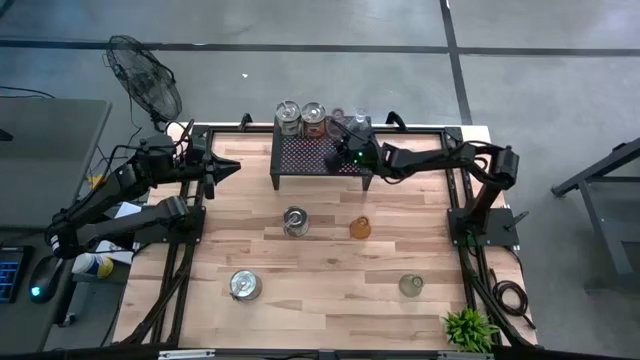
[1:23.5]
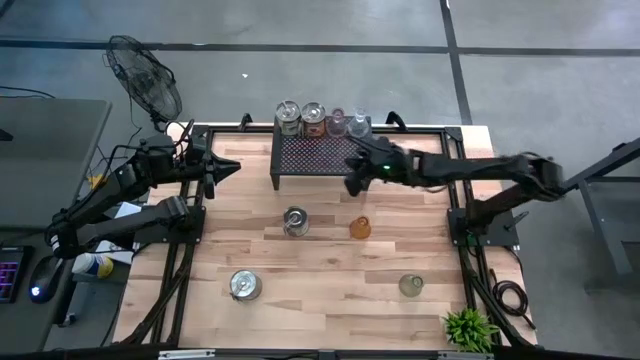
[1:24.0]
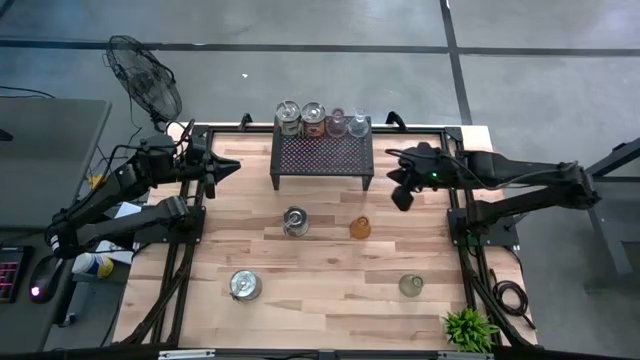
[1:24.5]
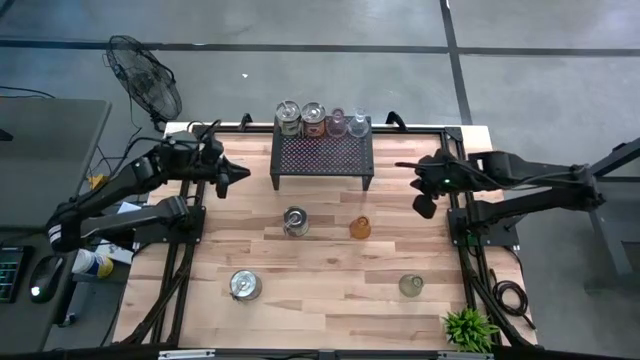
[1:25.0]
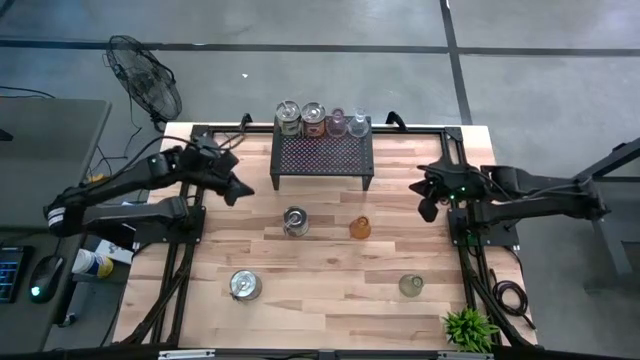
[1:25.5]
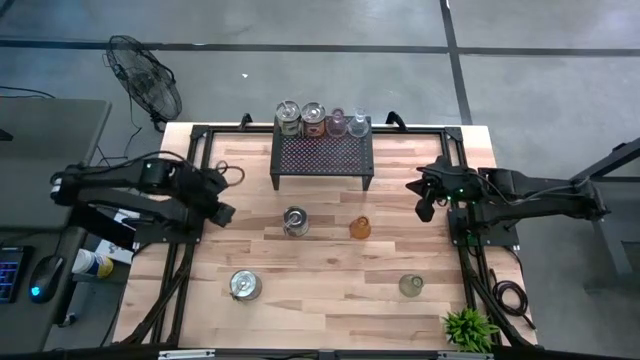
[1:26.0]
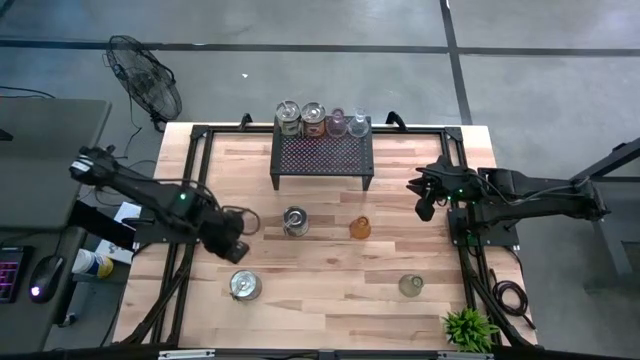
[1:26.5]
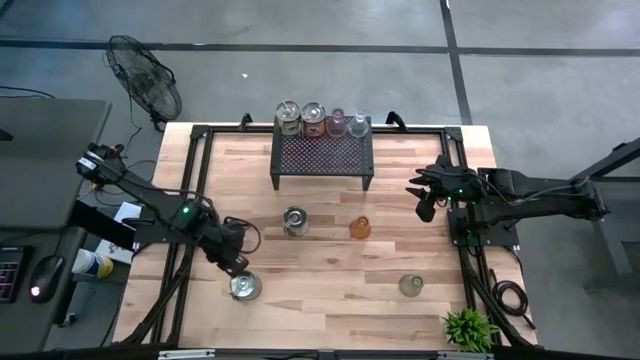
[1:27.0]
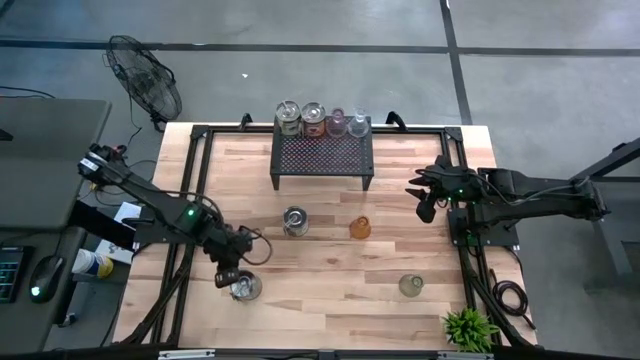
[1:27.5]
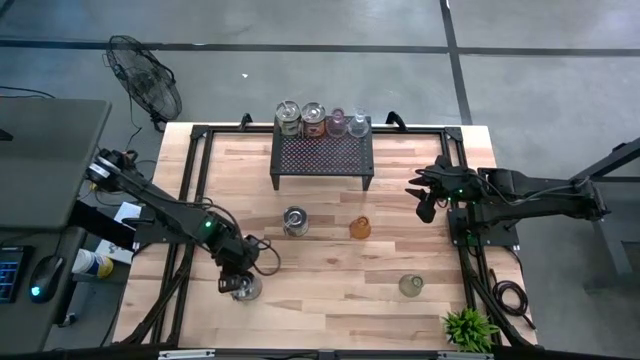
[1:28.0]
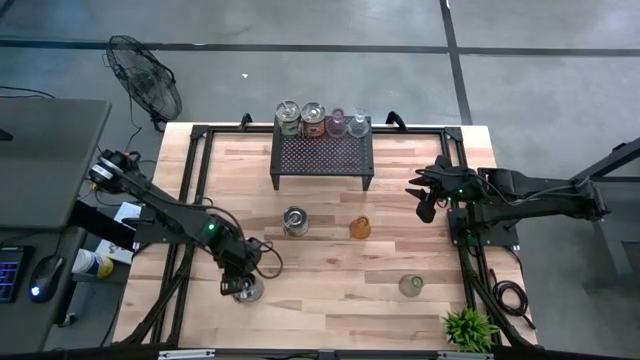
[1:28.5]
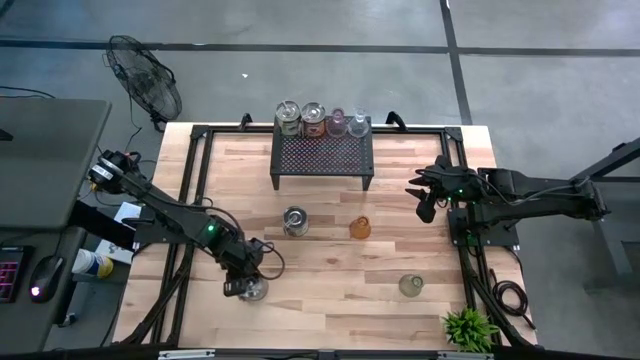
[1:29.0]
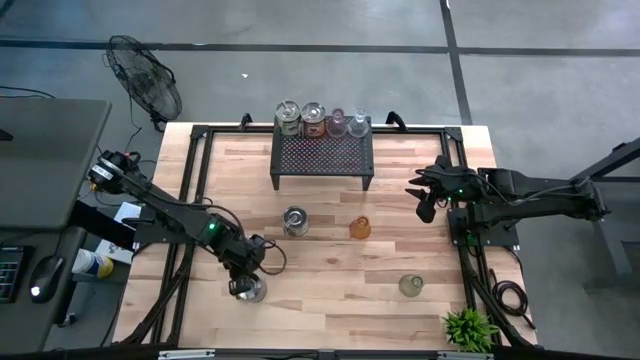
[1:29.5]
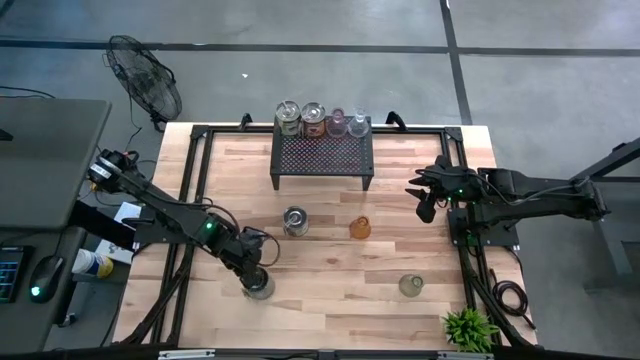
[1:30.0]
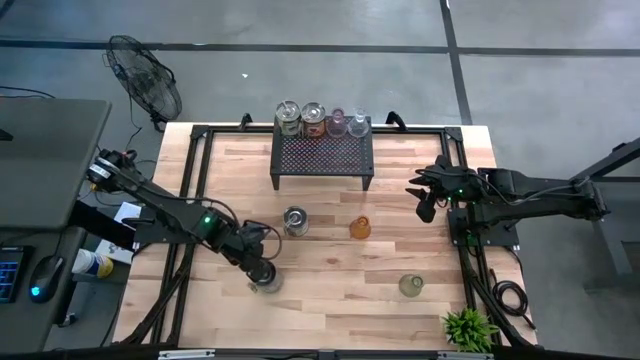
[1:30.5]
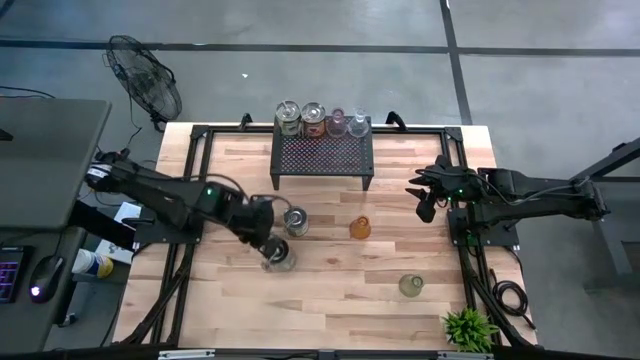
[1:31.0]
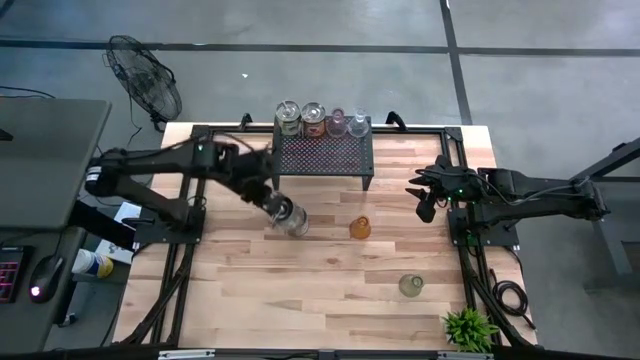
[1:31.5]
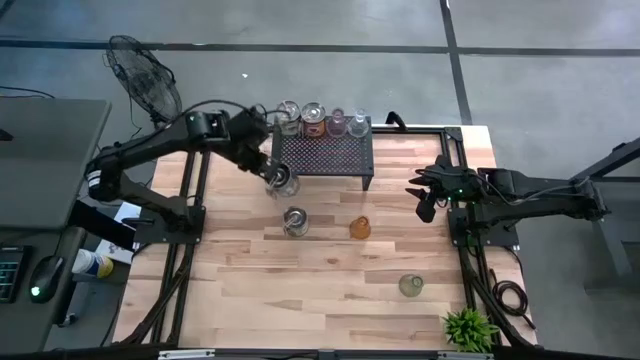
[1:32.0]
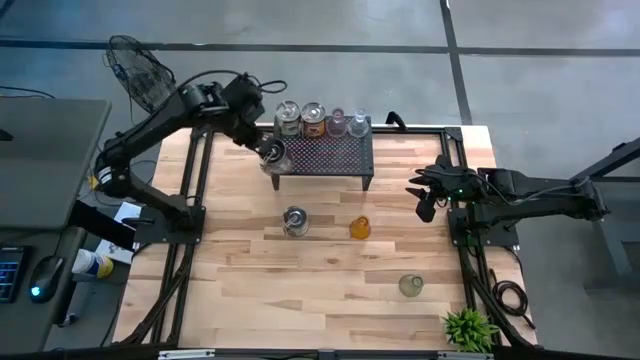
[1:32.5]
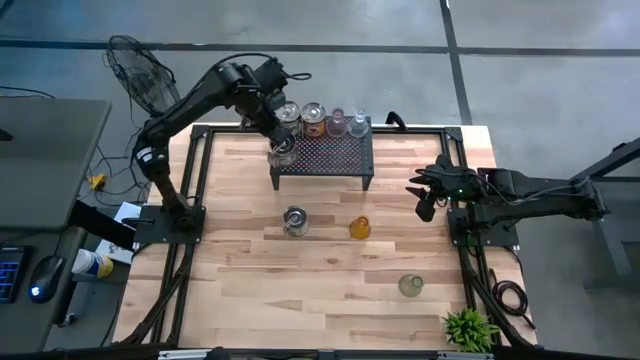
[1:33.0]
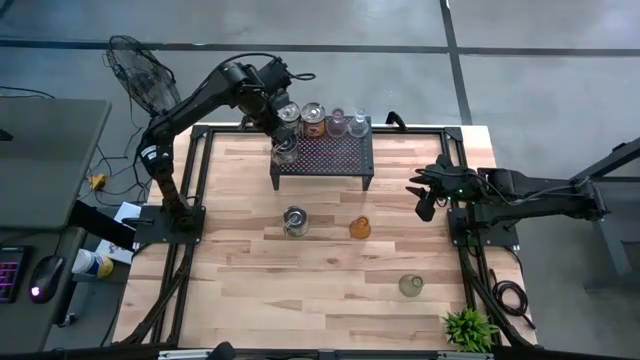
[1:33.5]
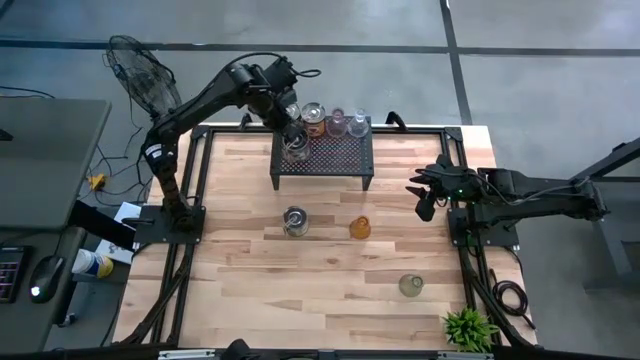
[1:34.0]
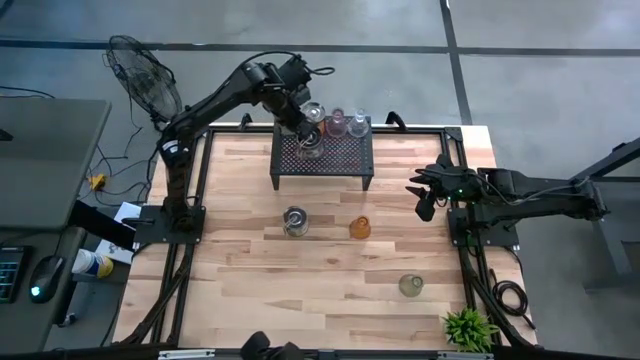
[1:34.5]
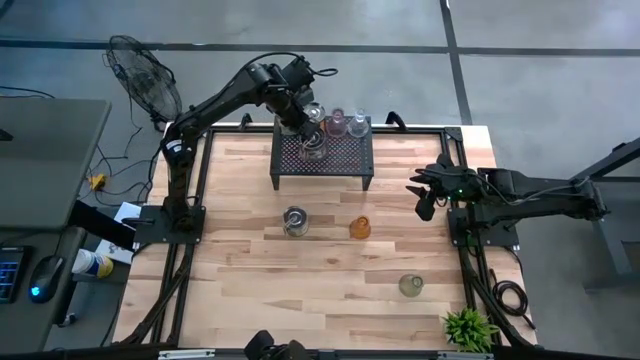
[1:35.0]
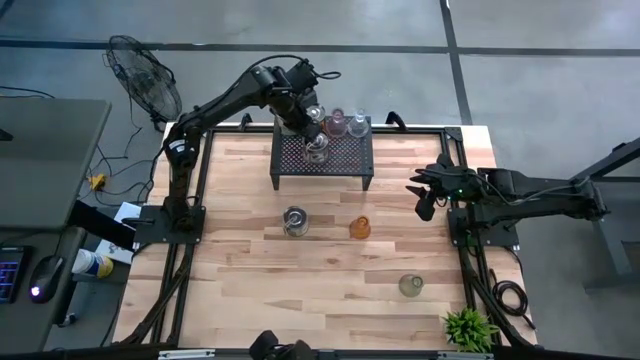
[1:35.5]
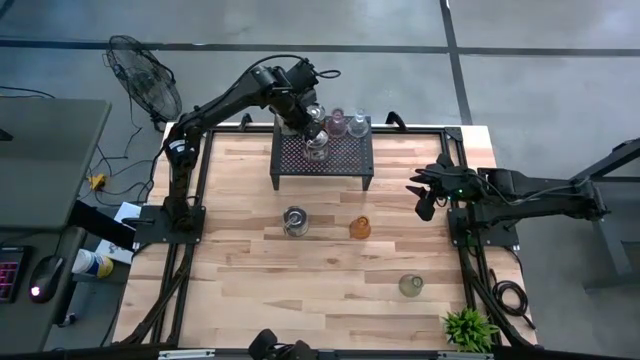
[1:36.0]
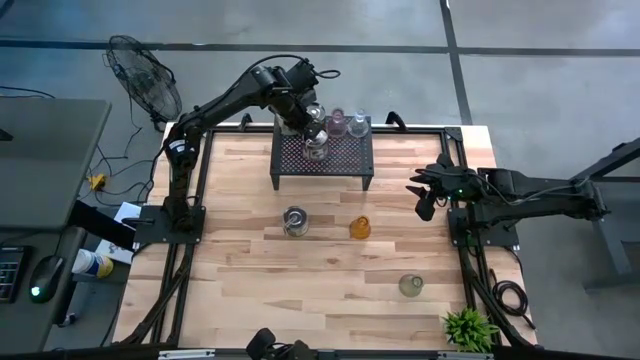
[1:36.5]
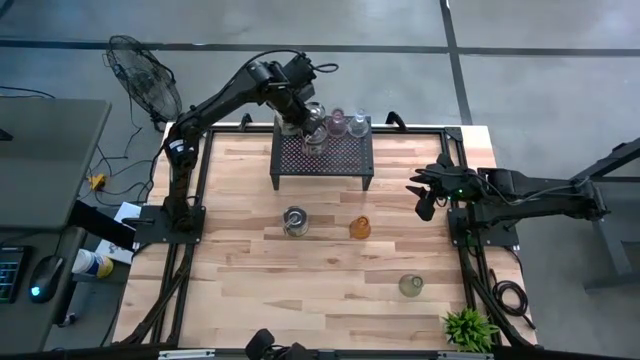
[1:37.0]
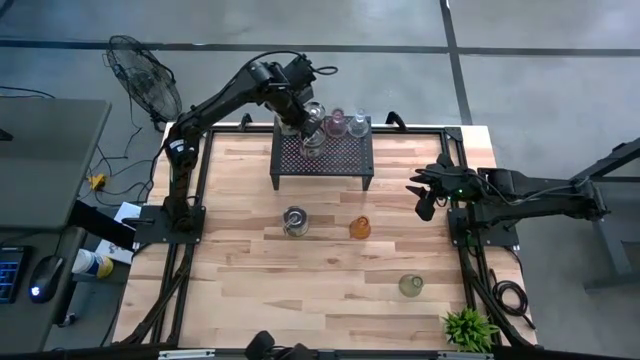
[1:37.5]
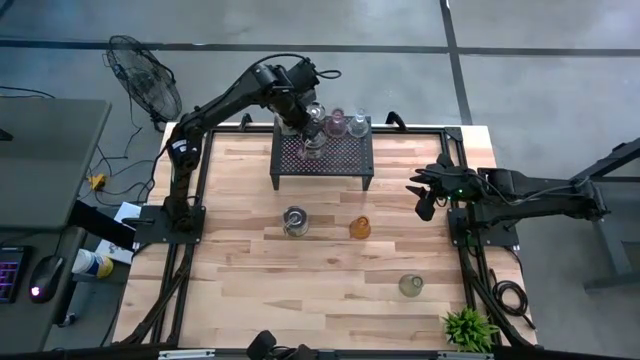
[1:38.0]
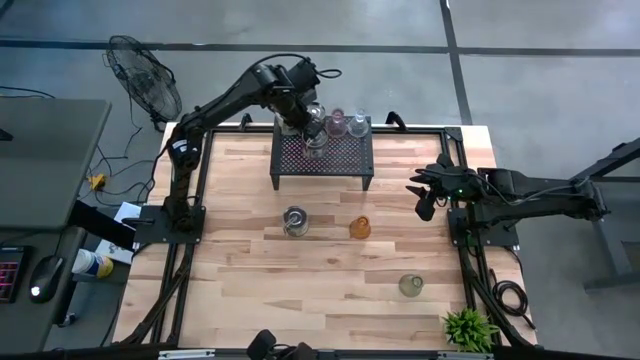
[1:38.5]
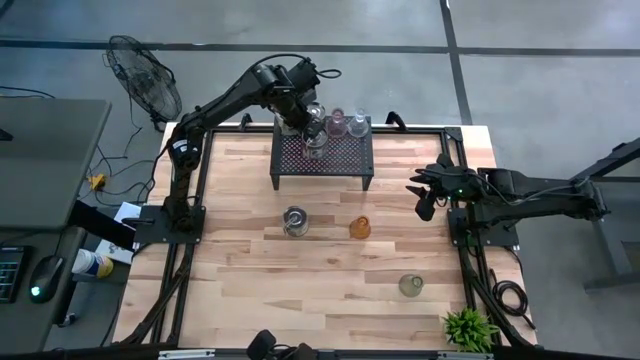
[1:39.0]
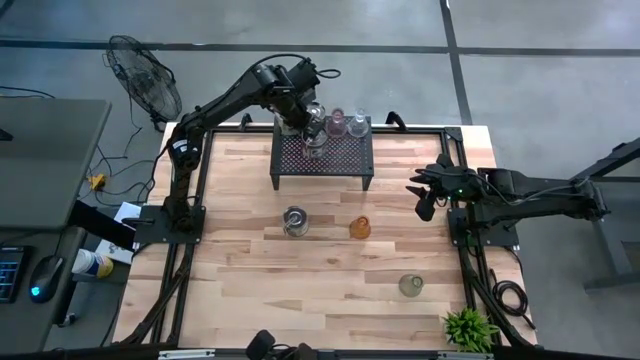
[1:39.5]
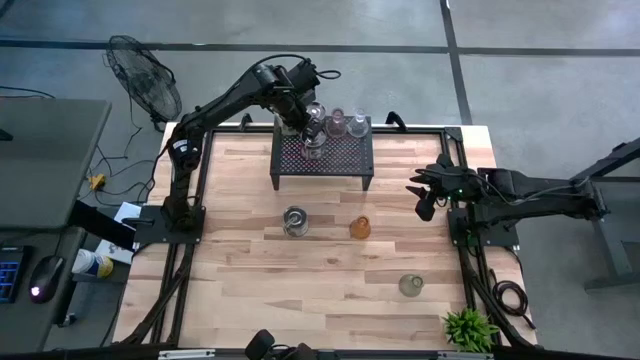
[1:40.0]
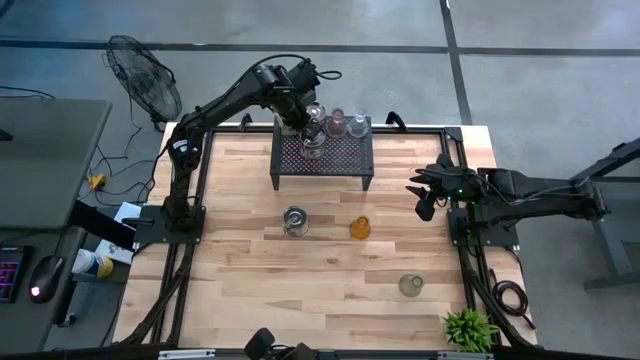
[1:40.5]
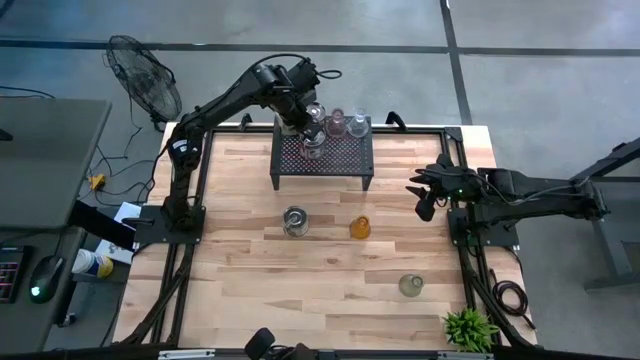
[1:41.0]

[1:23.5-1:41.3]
Task: Pick & Place candle stick holders
Put the silver scented candle can on the shelf

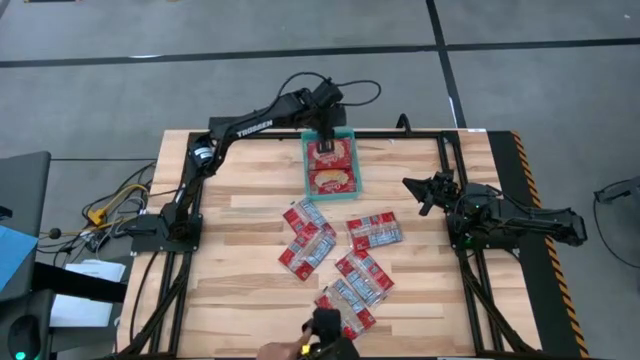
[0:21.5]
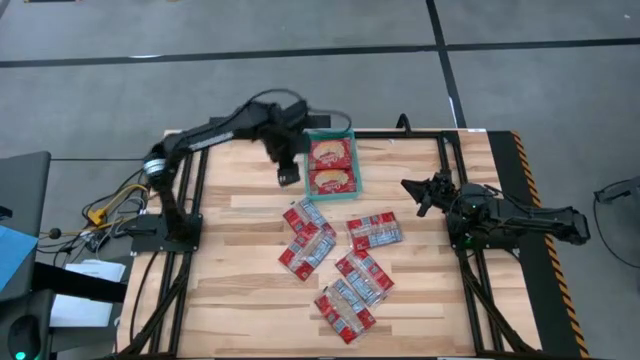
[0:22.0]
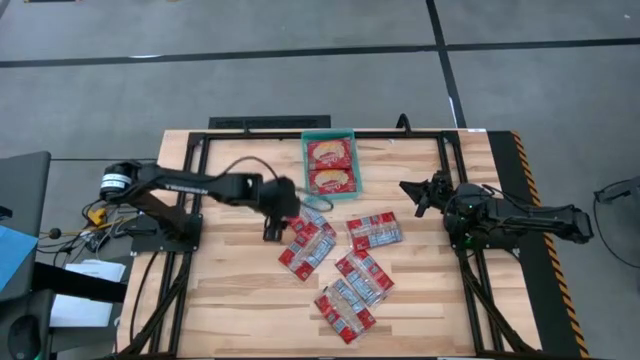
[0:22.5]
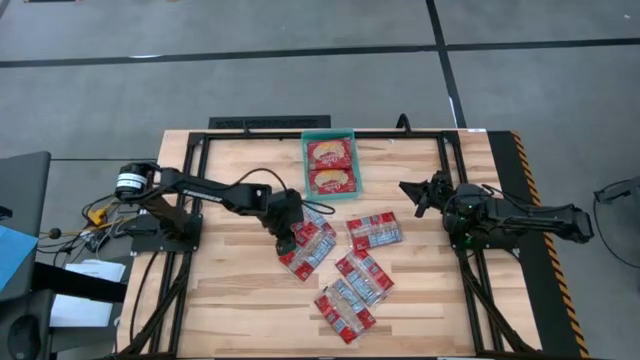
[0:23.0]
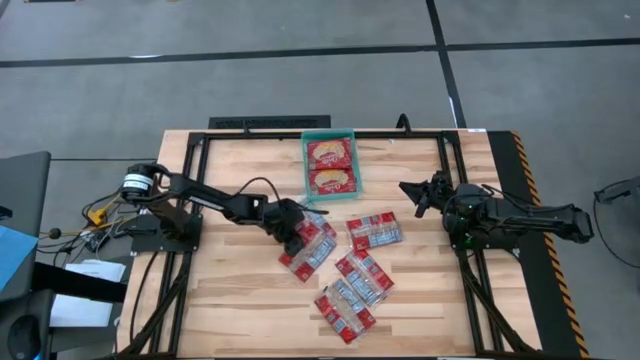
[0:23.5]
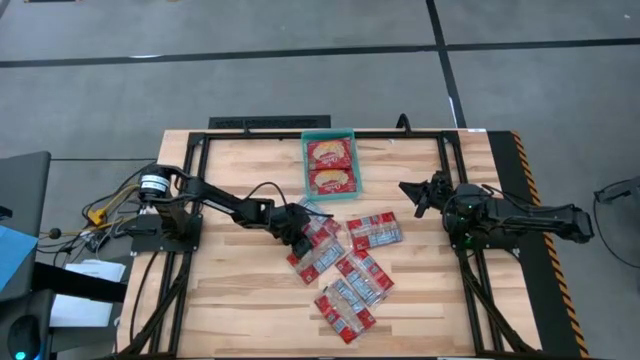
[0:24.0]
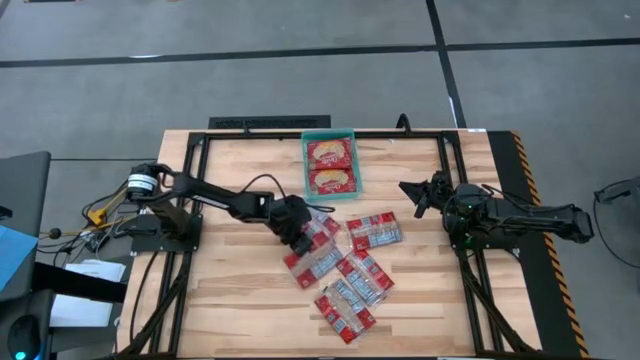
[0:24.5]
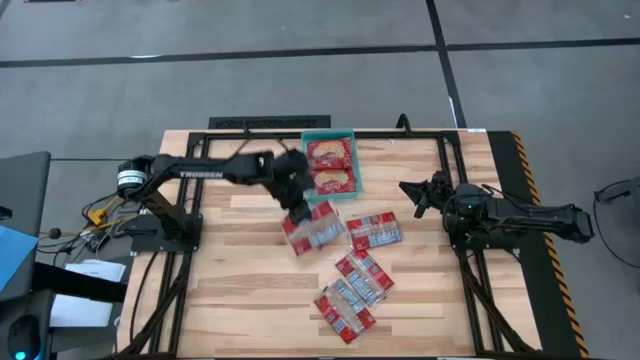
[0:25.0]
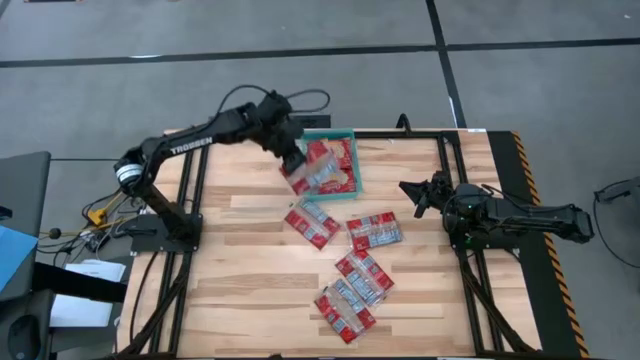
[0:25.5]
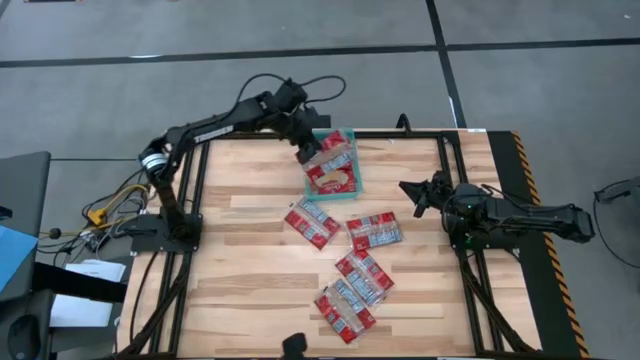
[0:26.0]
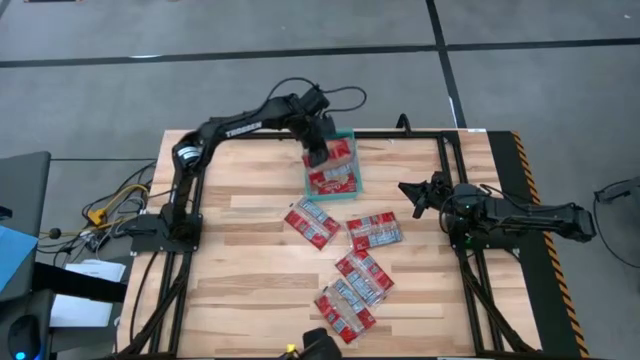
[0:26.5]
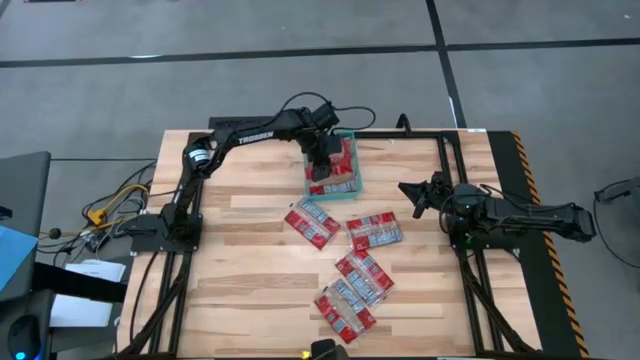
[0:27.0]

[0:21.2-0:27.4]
Task: Sort popcorn bags into baskets
Put the red popcorn bag into the green bin
